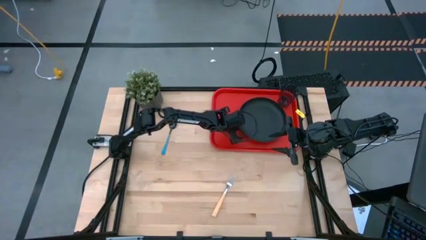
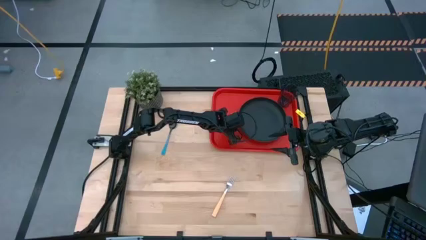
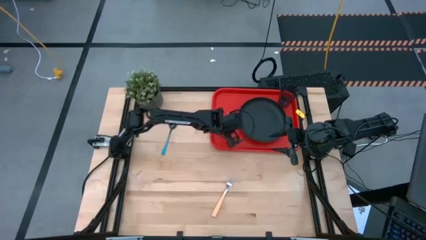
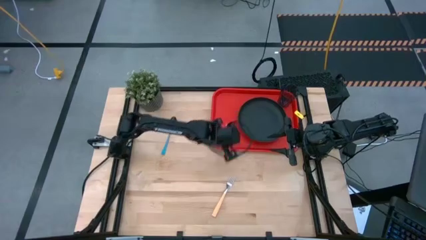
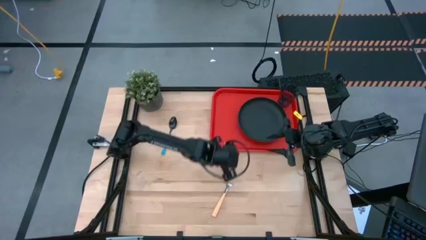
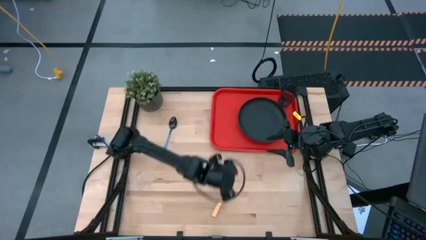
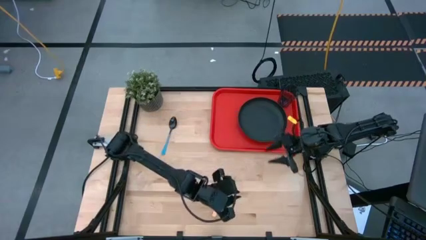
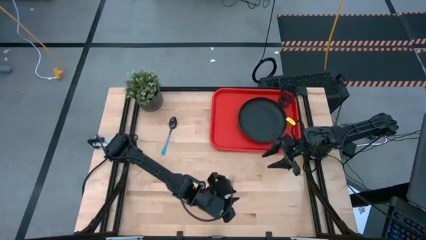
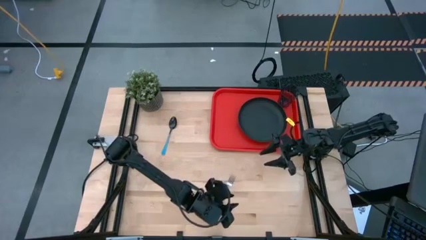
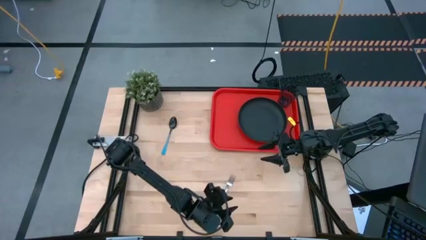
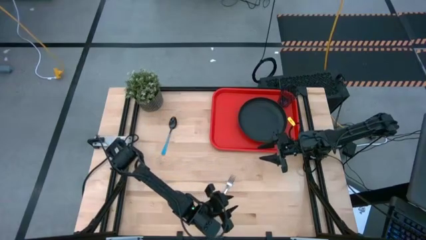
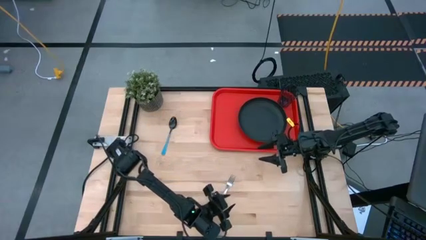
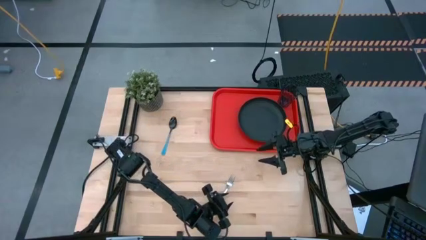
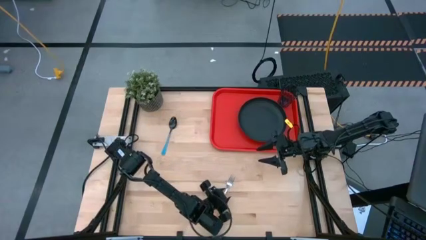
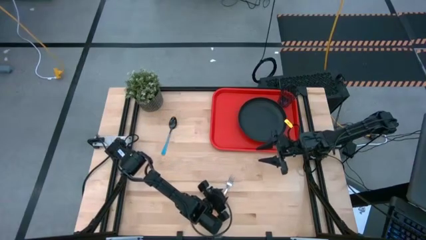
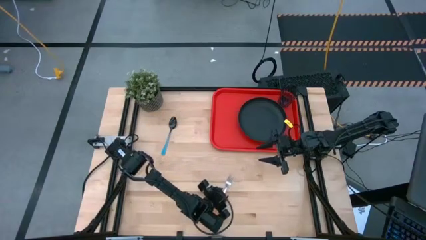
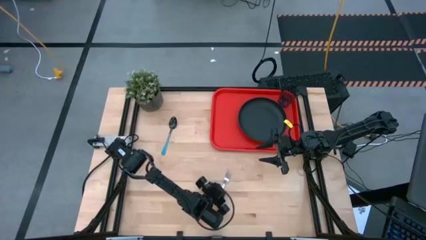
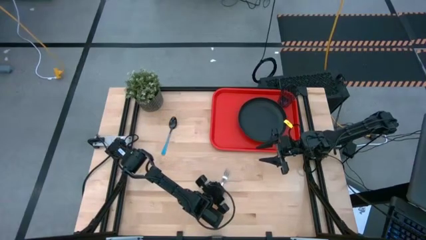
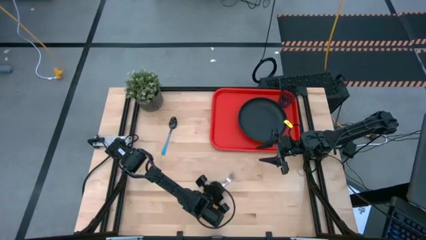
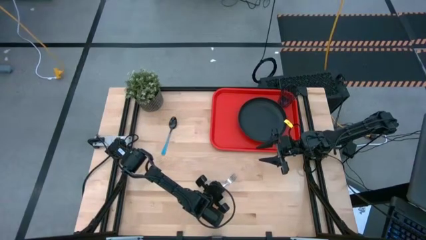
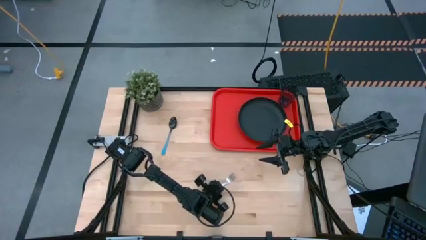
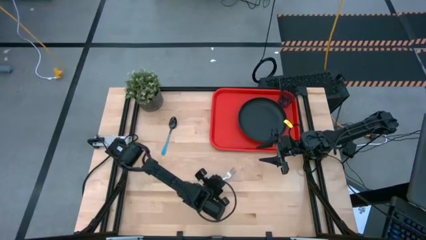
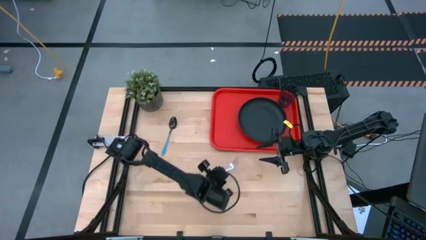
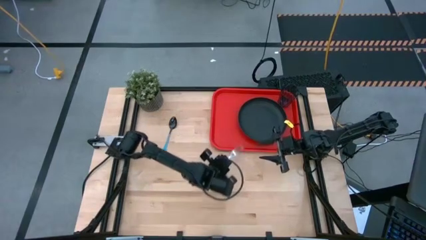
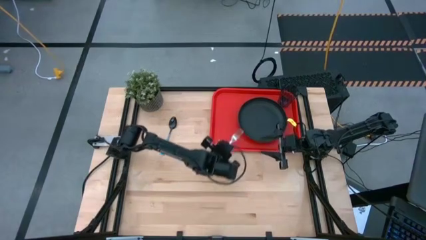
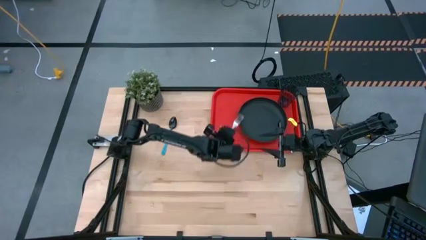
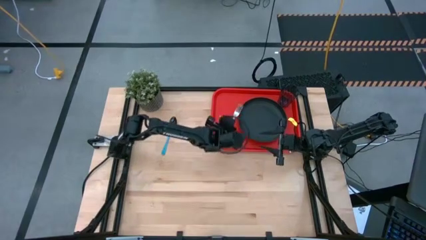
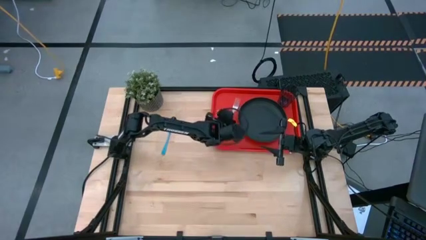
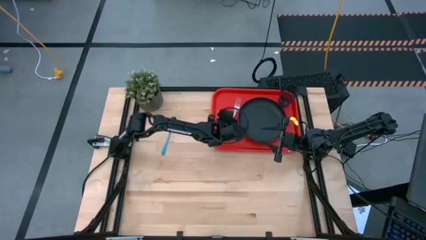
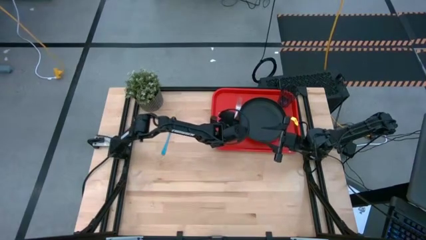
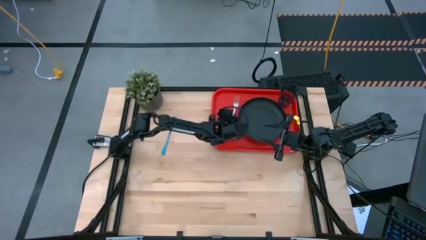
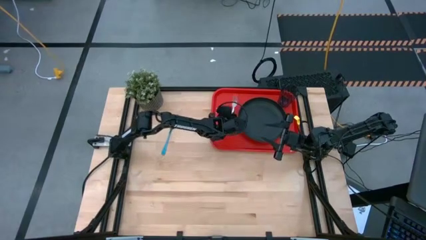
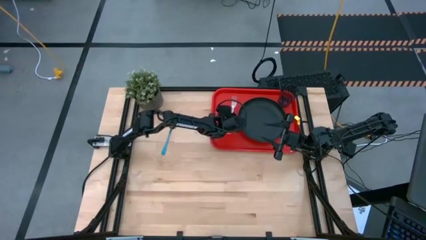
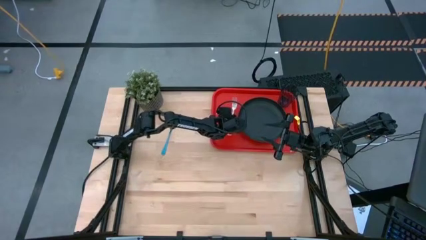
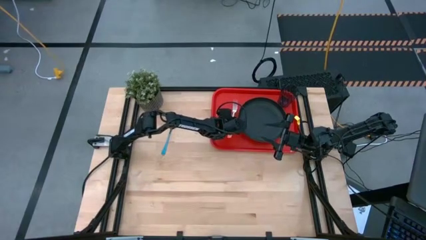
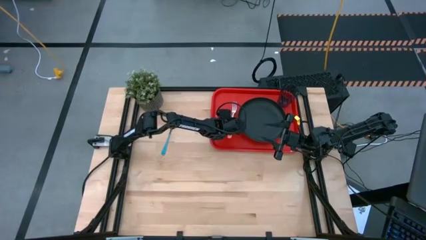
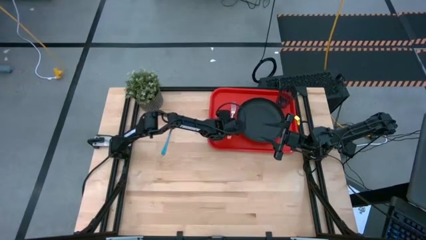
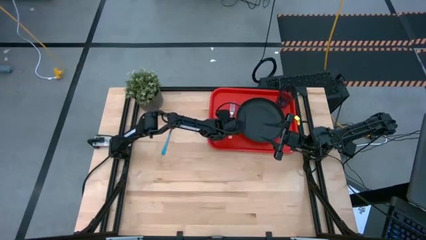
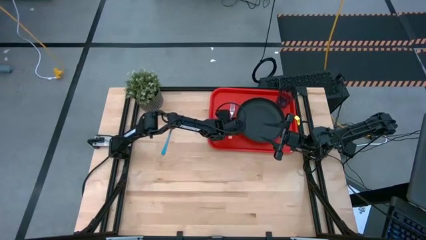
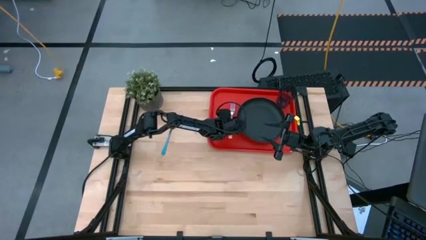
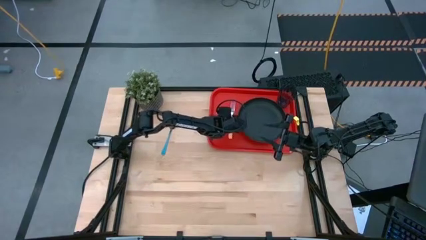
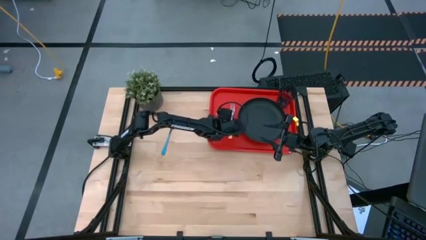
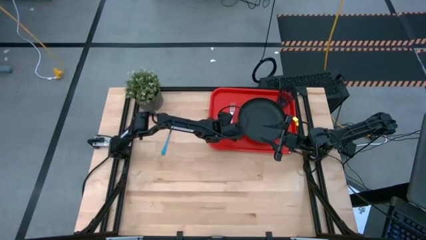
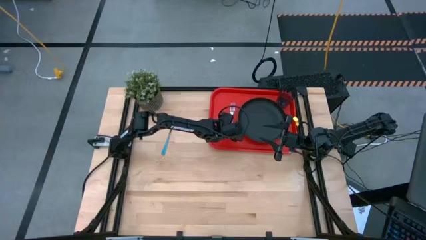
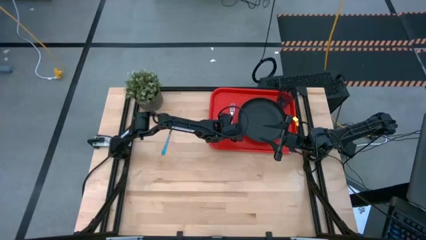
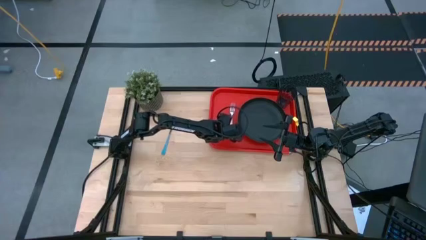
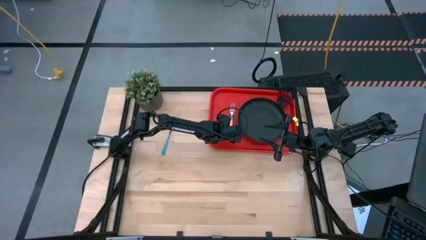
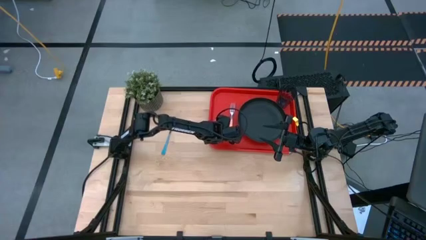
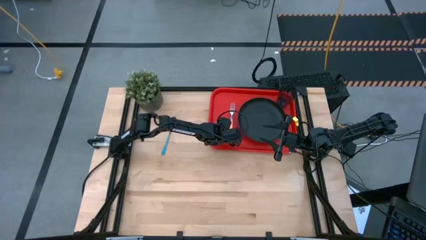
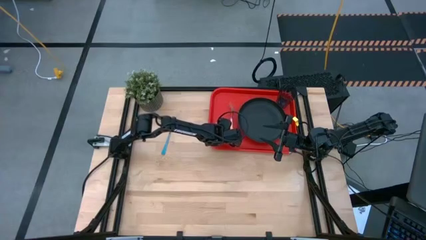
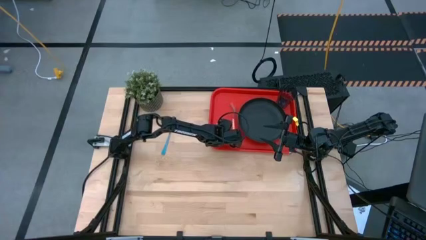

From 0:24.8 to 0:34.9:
Task: Pick and place plate/cup/fork/spoon on tray
Put the yellow fork to the left of the black plate on the red tray

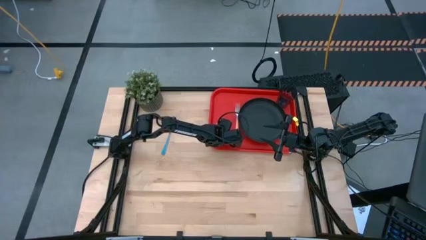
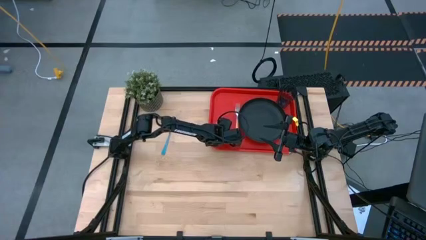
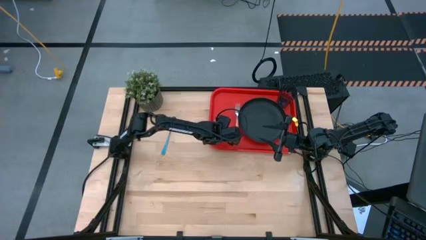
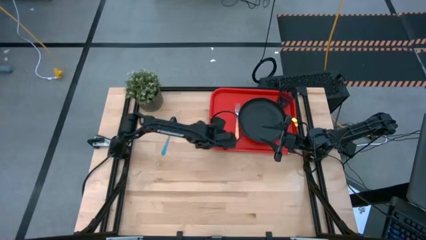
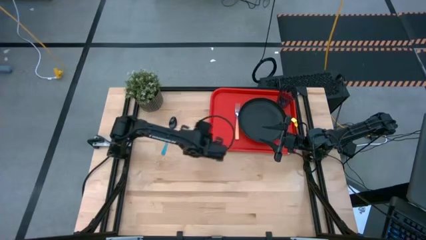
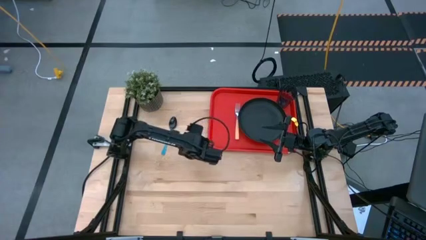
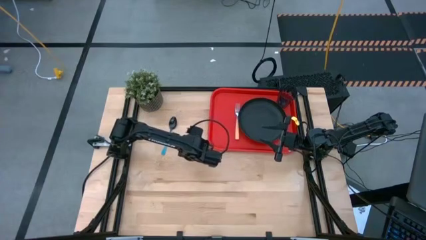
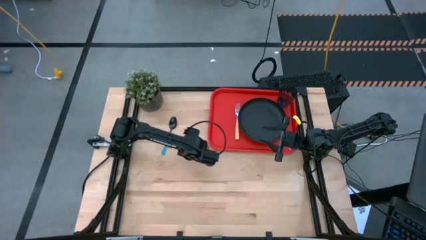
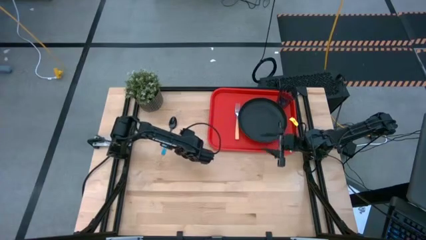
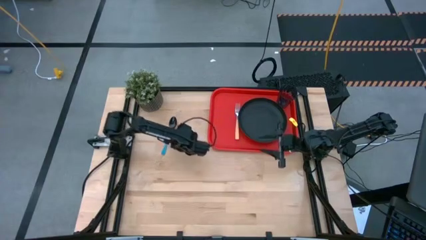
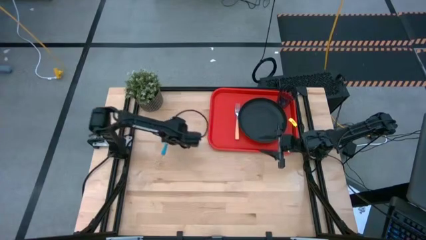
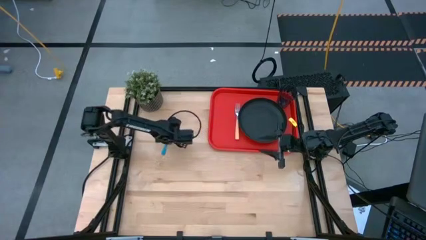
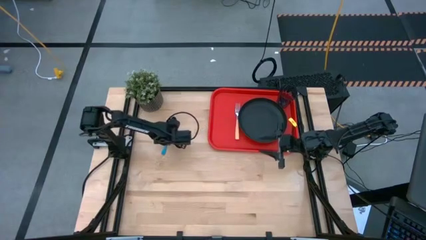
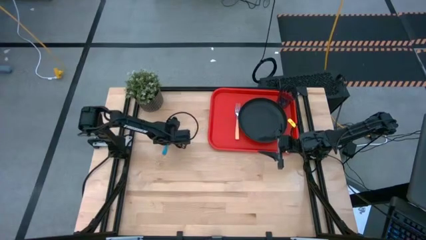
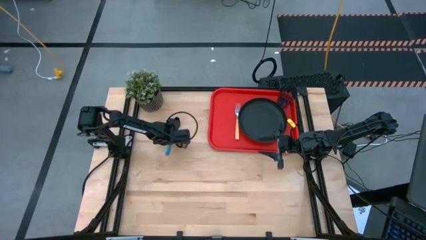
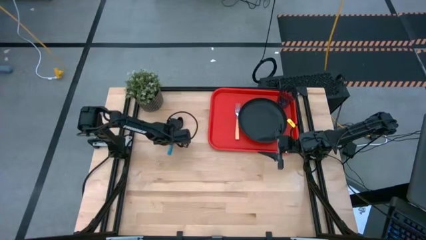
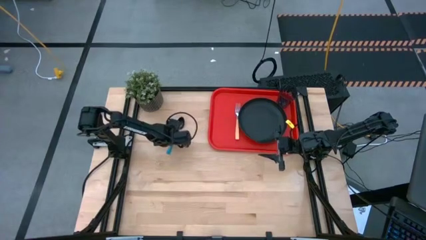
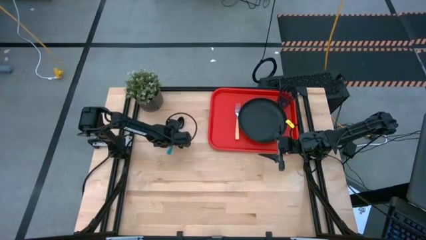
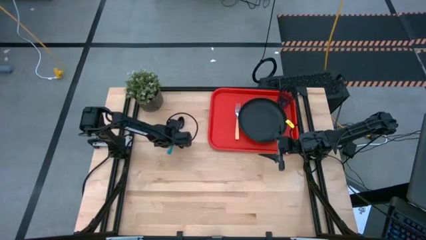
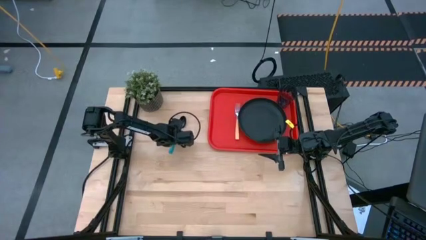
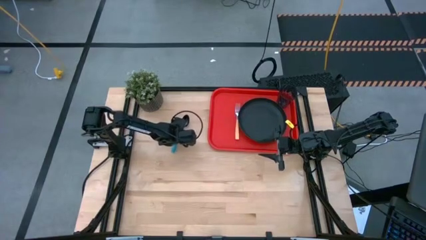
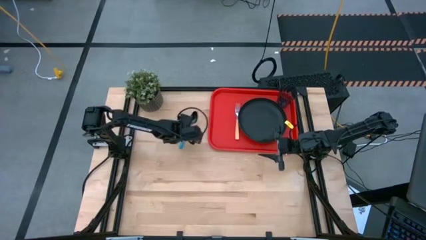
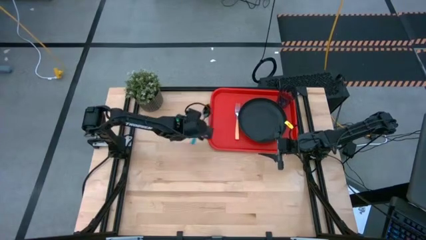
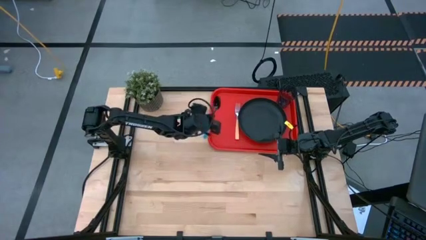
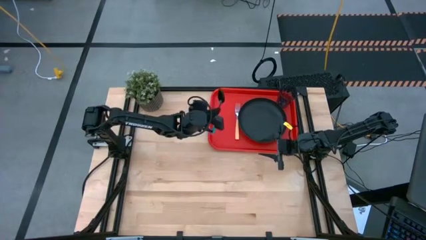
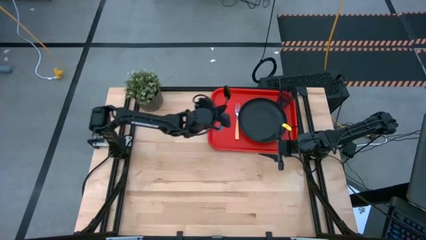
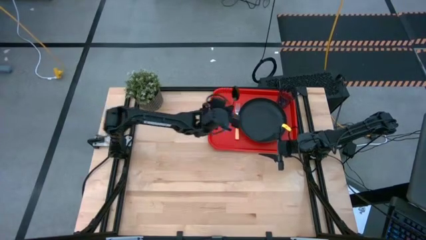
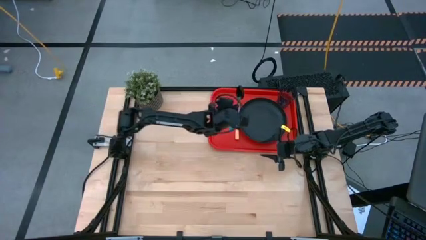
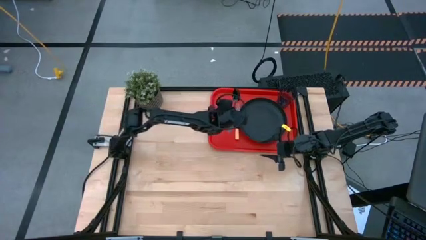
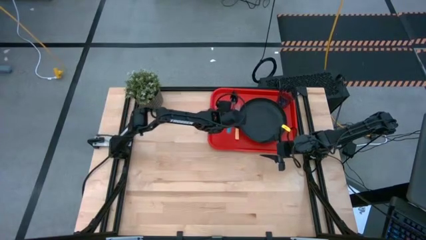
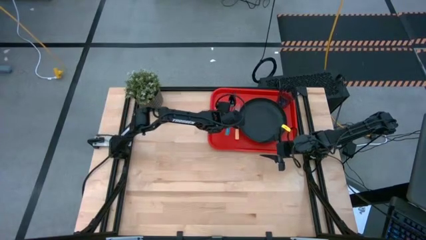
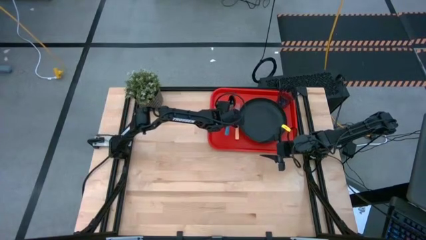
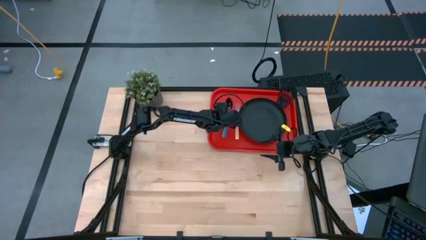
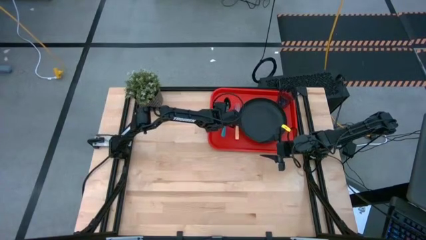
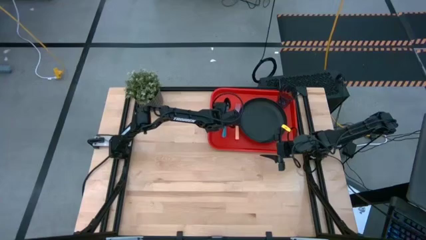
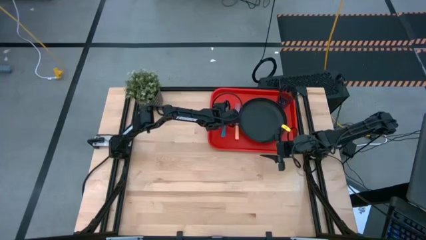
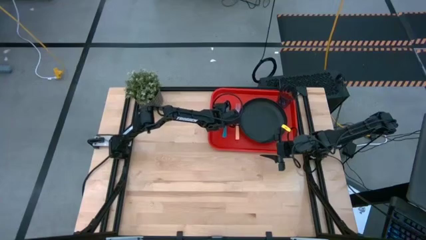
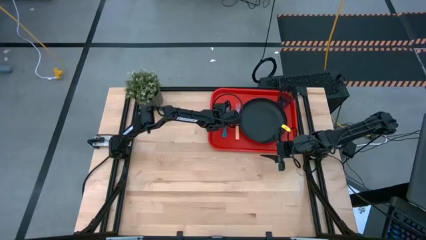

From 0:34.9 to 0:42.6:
Put the blue spoon to the left of the black plate on the red tray
